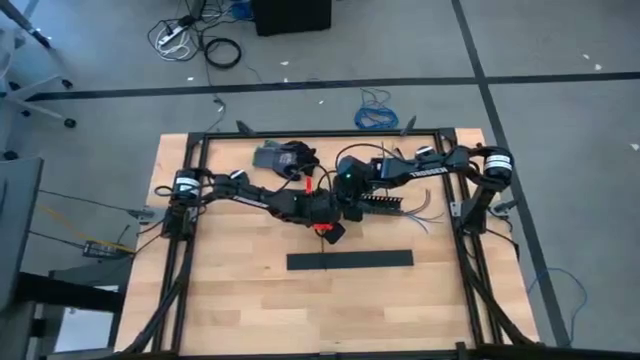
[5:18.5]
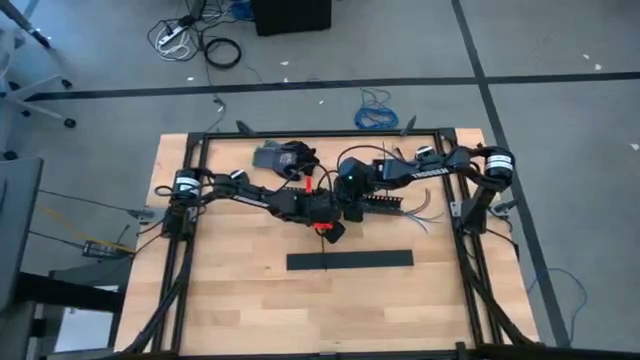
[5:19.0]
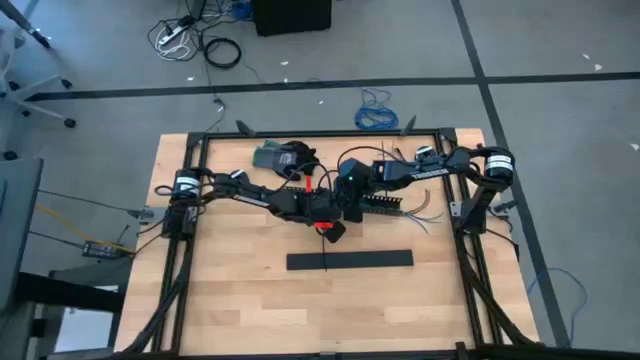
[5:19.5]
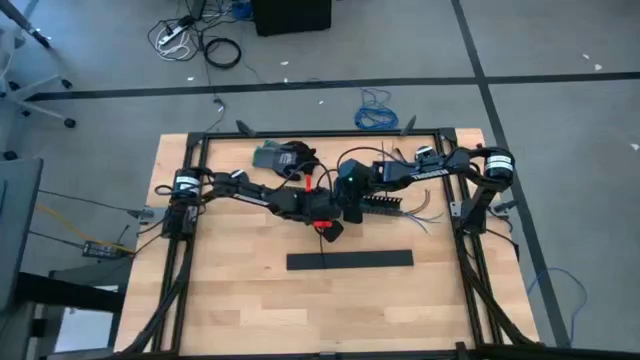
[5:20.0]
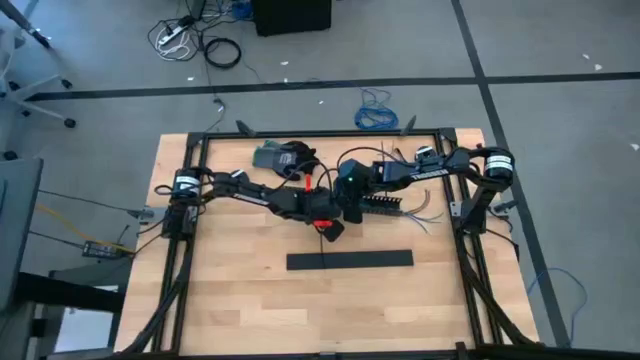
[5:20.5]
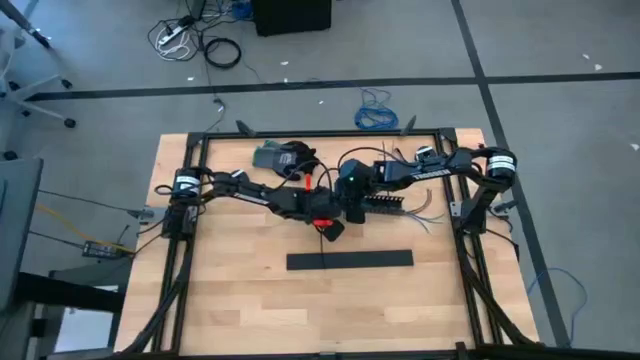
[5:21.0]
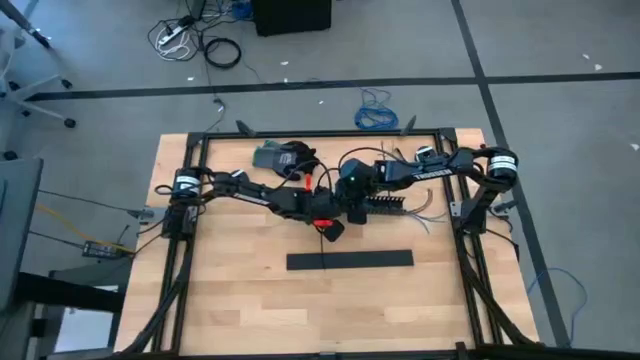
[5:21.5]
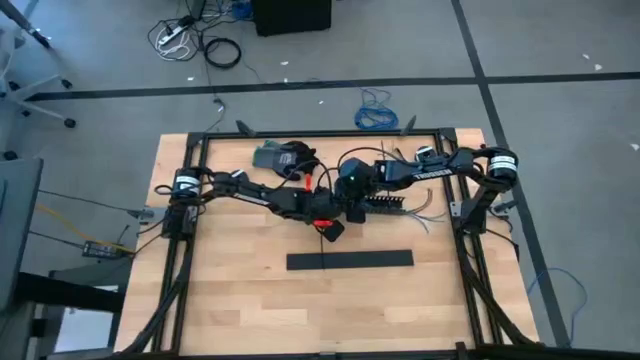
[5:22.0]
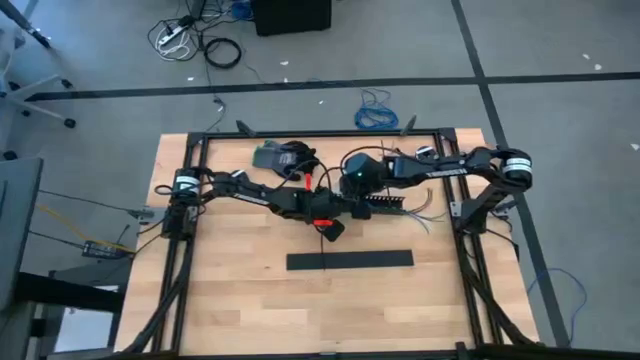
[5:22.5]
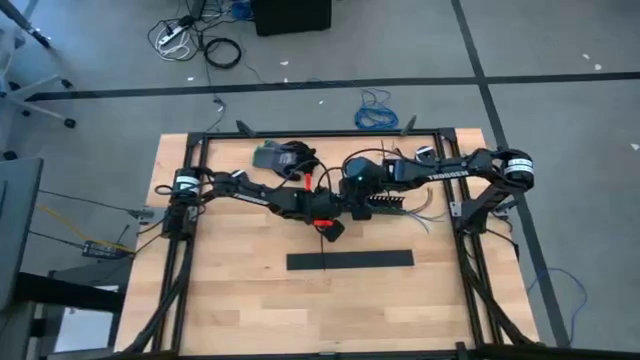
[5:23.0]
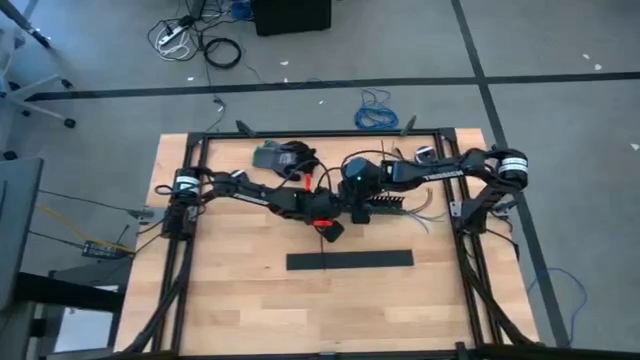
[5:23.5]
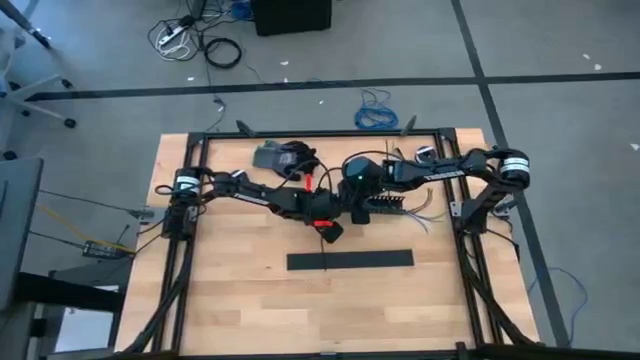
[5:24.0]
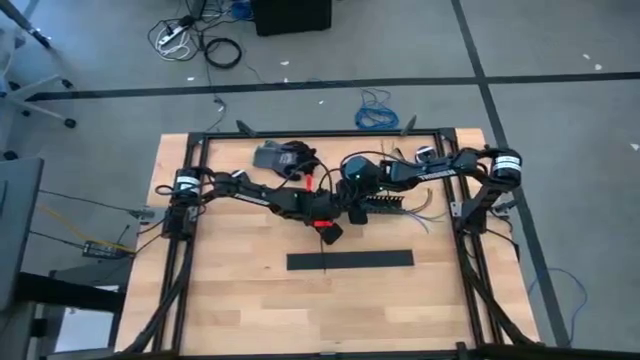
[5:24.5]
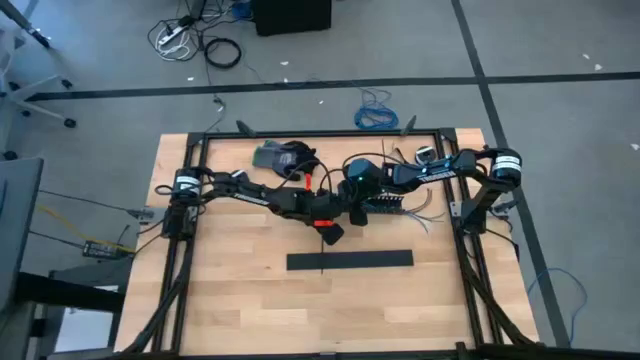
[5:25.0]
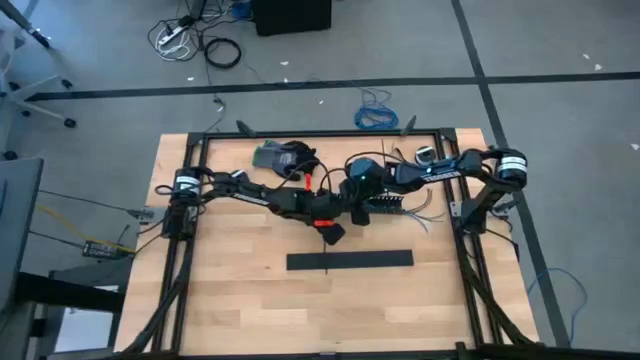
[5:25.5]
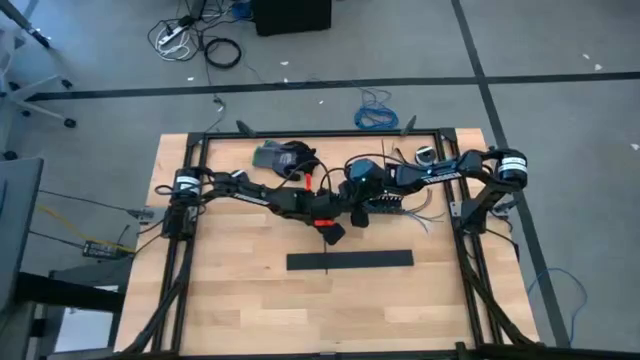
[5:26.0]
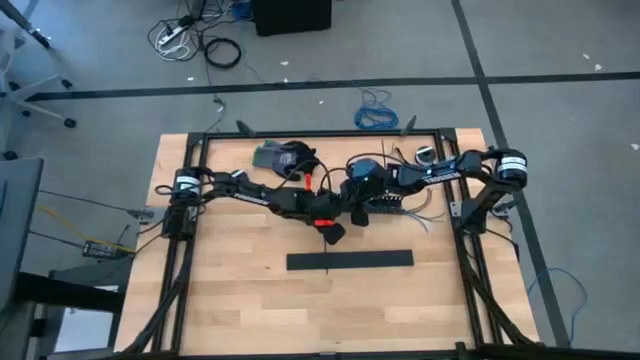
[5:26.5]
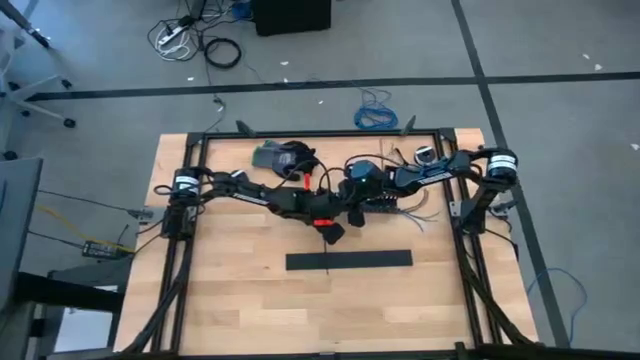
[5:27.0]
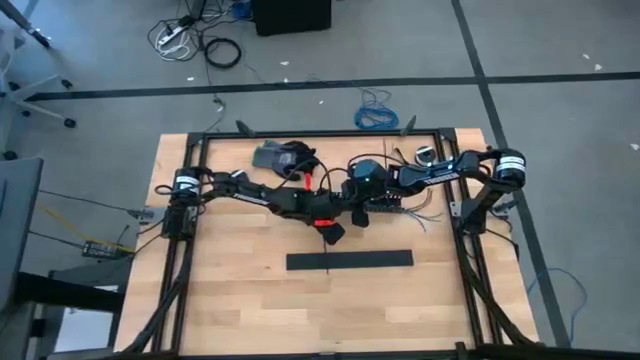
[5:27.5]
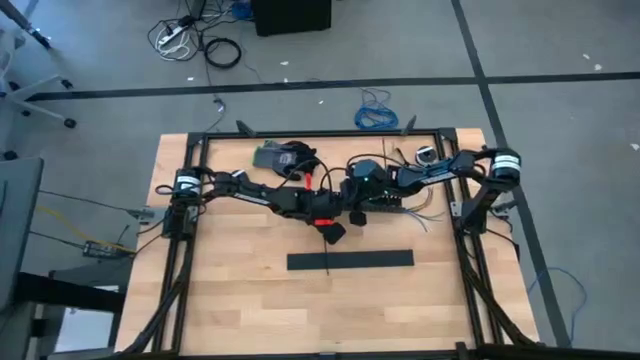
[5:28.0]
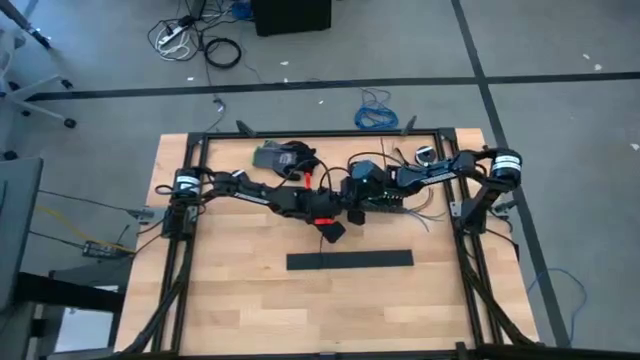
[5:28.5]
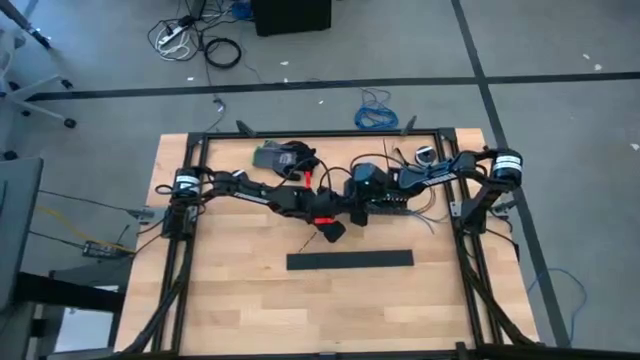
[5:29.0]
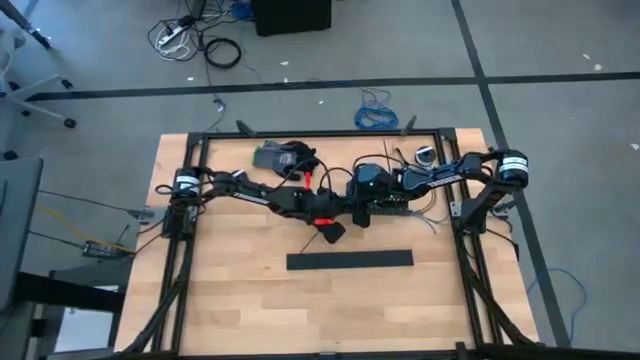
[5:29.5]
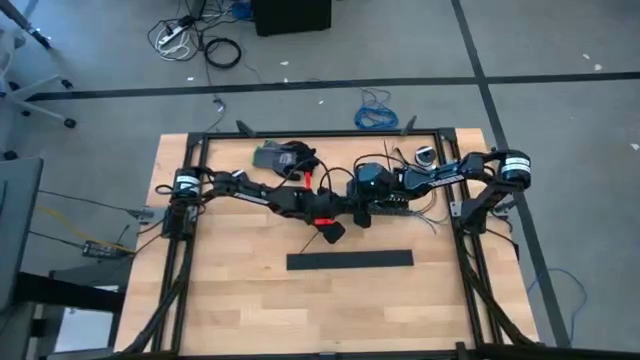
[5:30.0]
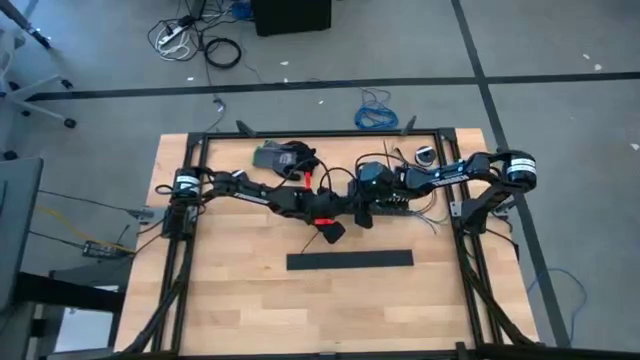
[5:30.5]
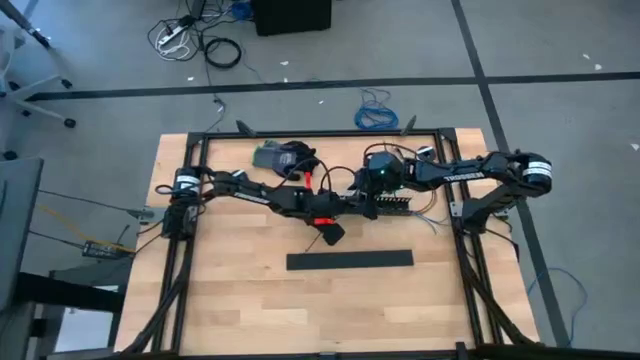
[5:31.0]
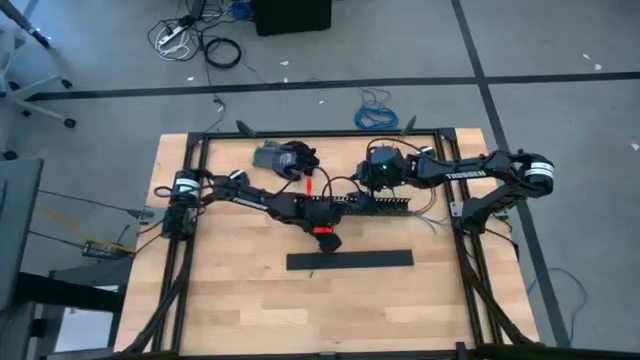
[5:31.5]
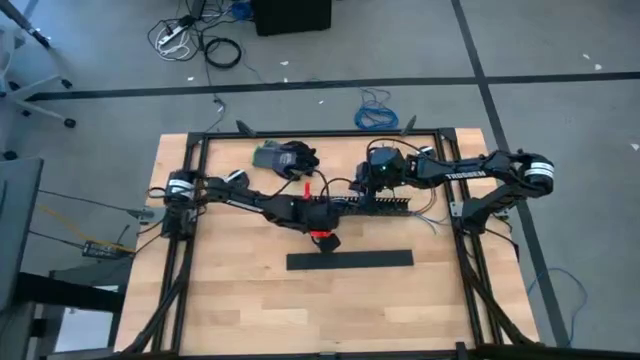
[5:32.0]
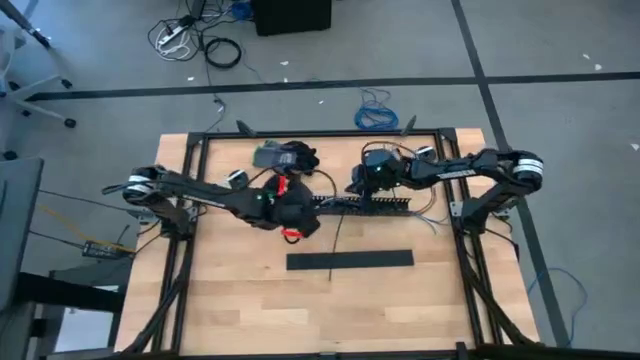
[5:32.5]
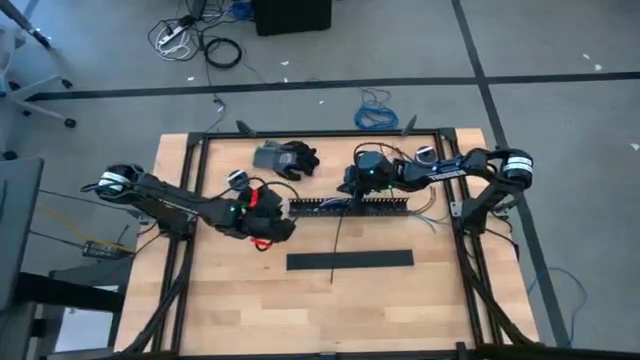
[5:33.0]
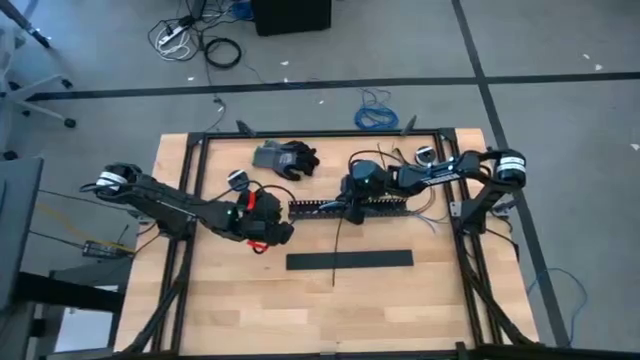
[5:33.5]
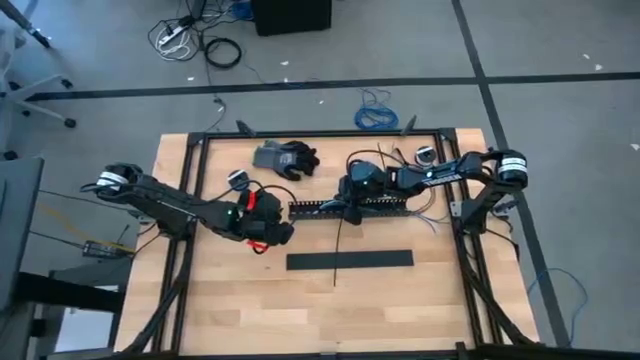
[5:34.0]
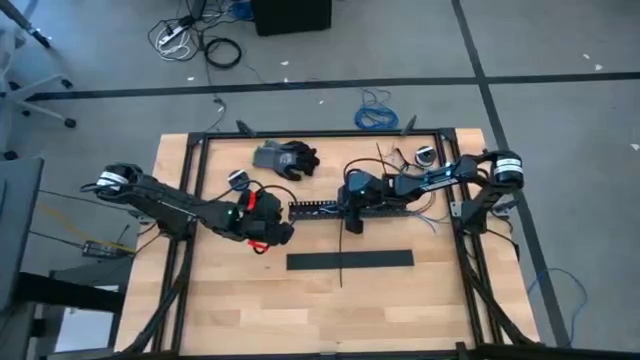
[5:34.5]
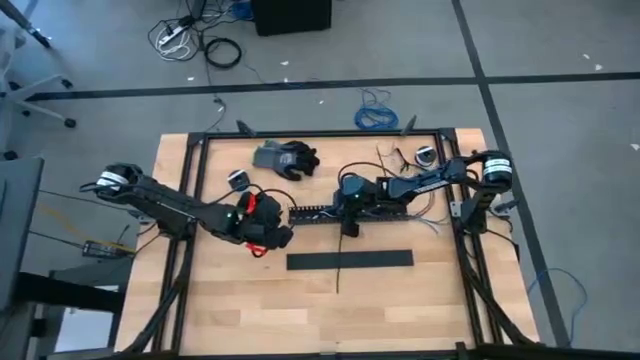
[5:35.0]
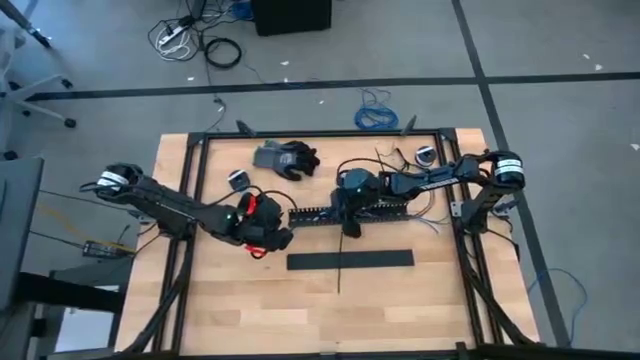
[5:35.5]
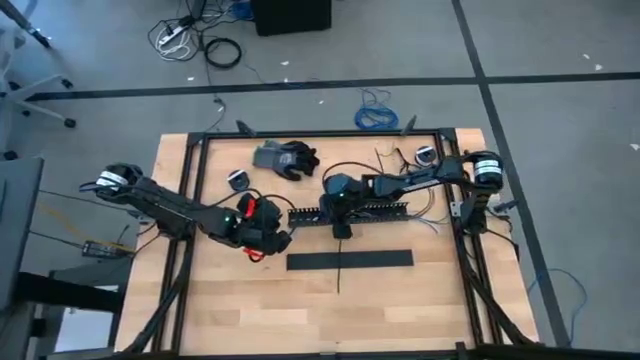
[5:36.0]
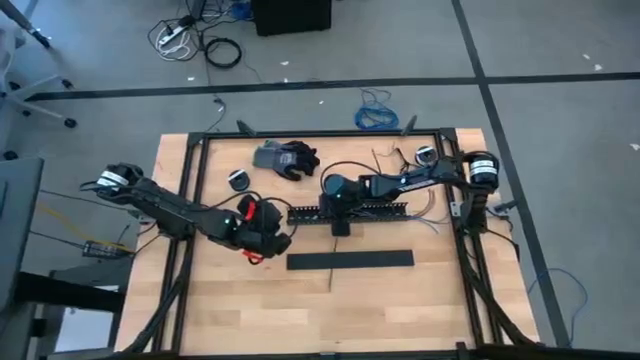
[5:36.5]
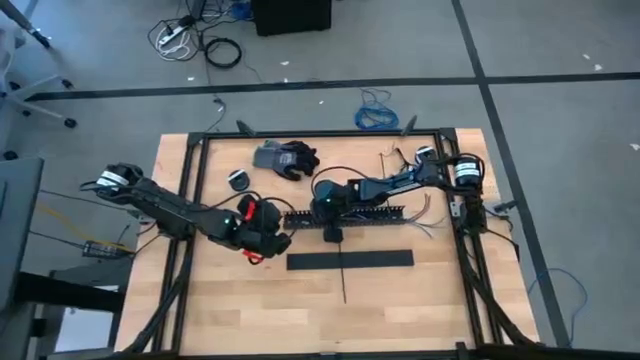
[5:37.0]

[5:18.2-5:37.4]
Task: Ziptie cables
Put the ziptied wire cables into the black cable duct
